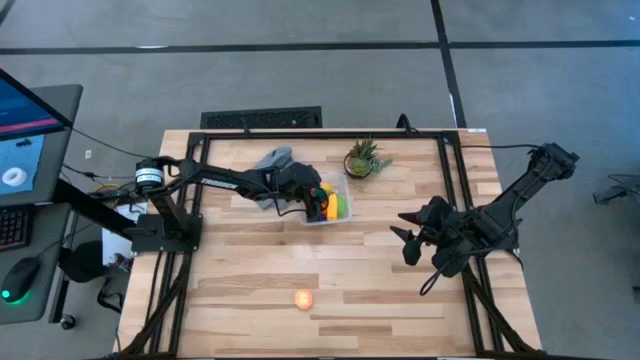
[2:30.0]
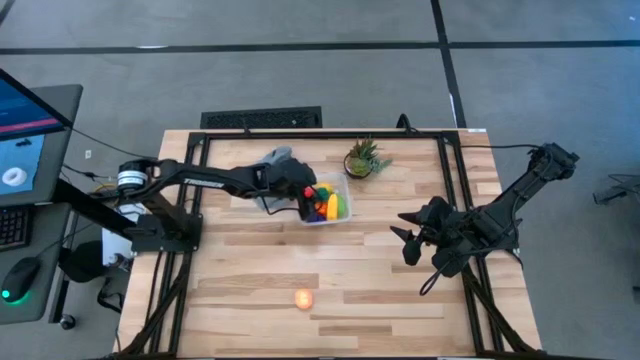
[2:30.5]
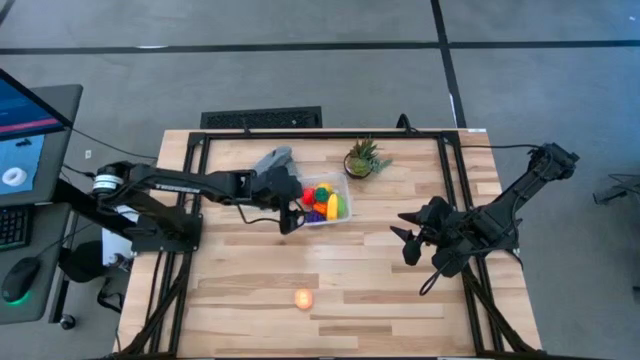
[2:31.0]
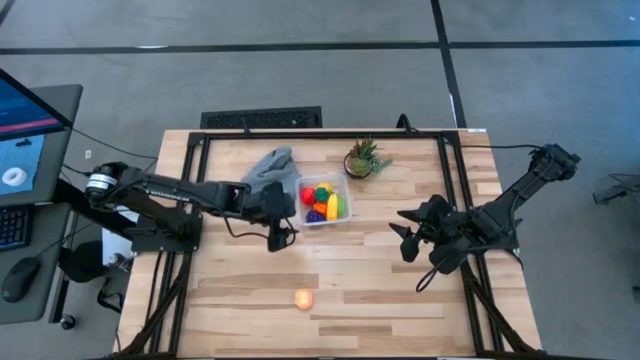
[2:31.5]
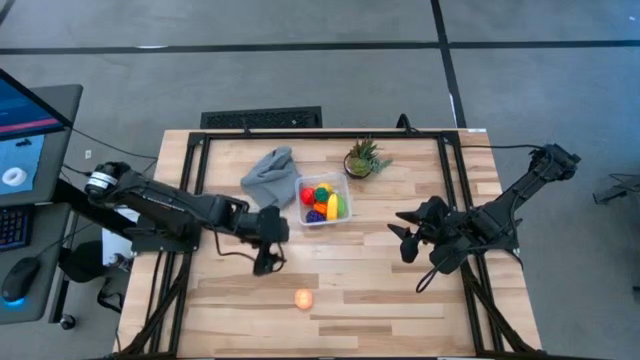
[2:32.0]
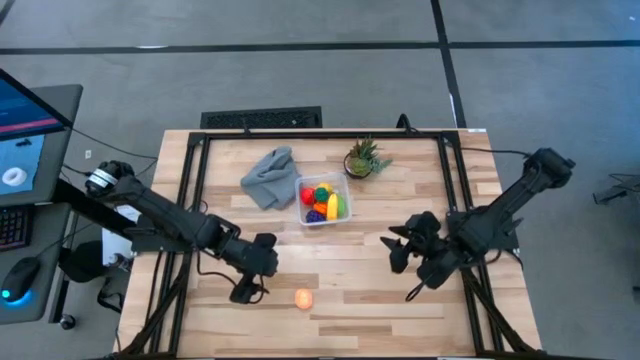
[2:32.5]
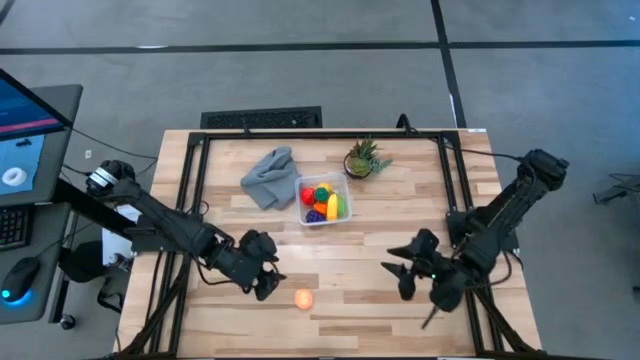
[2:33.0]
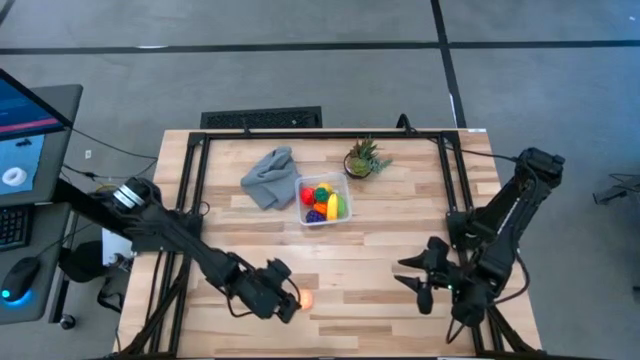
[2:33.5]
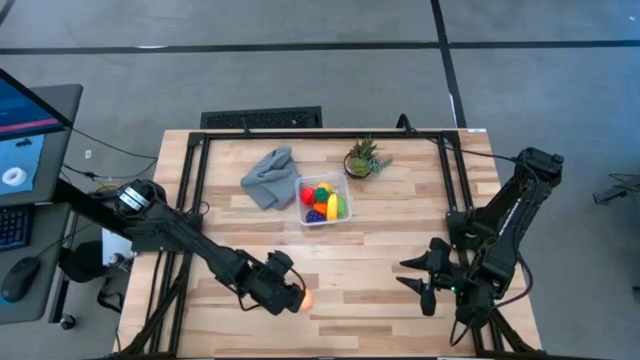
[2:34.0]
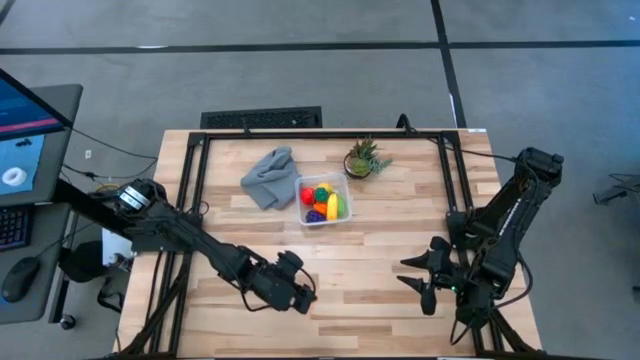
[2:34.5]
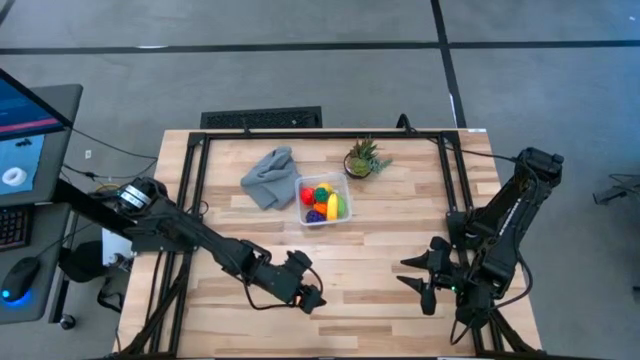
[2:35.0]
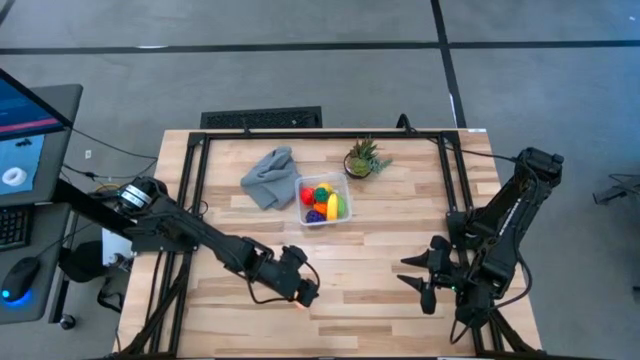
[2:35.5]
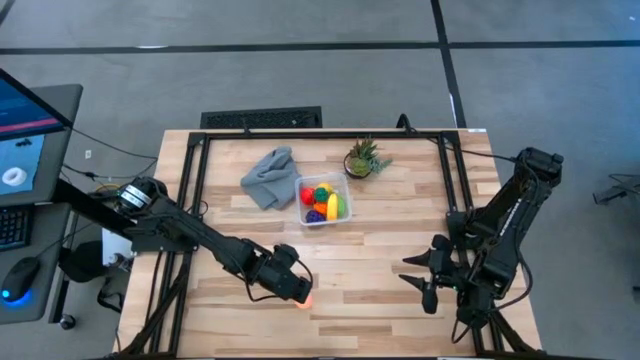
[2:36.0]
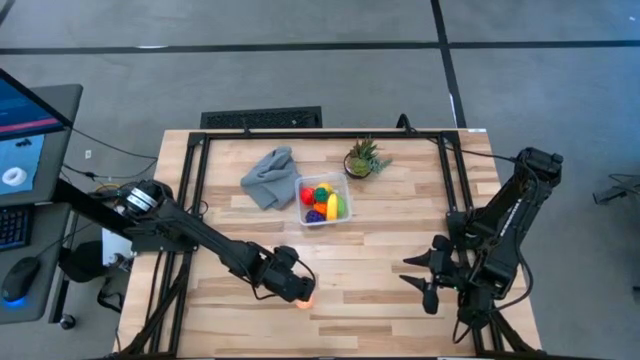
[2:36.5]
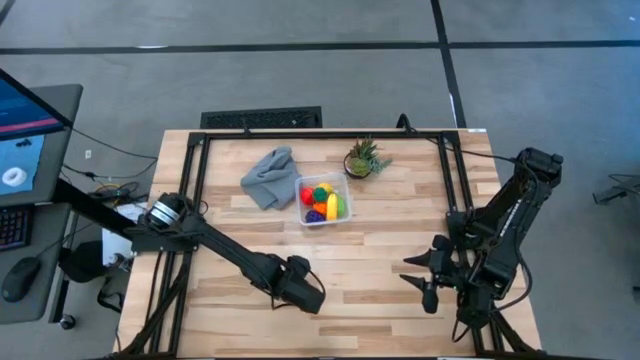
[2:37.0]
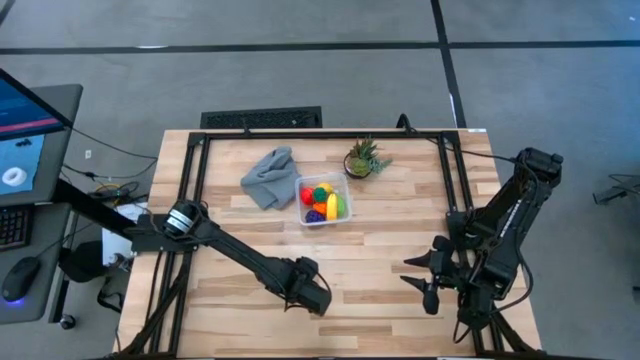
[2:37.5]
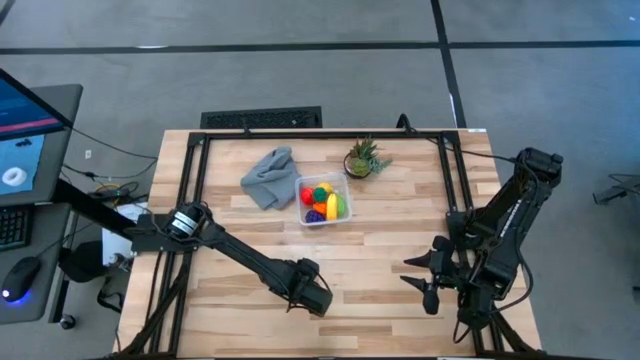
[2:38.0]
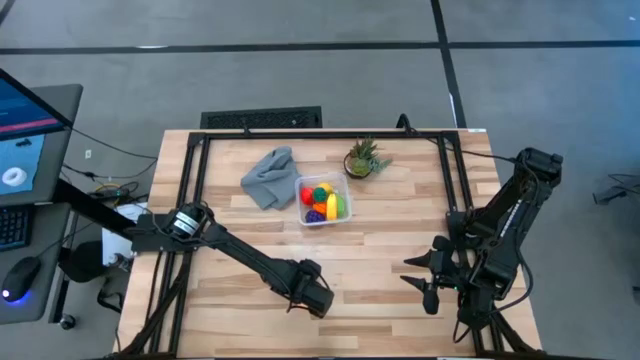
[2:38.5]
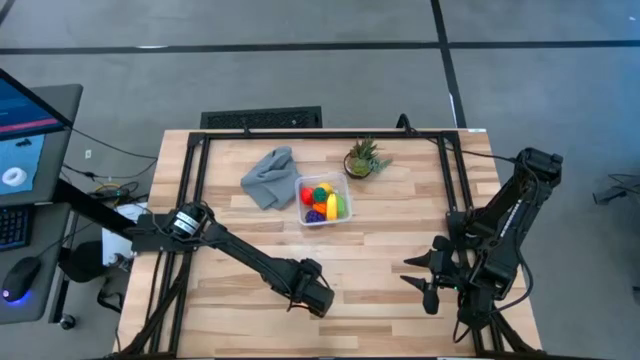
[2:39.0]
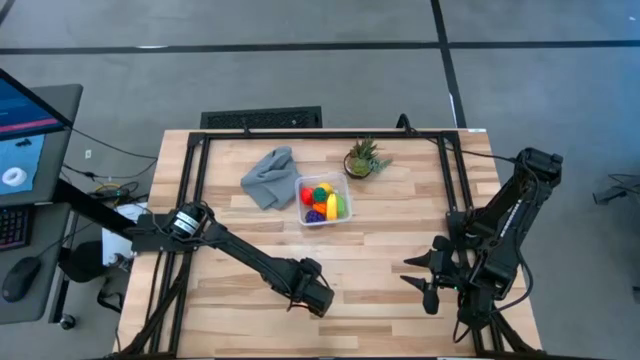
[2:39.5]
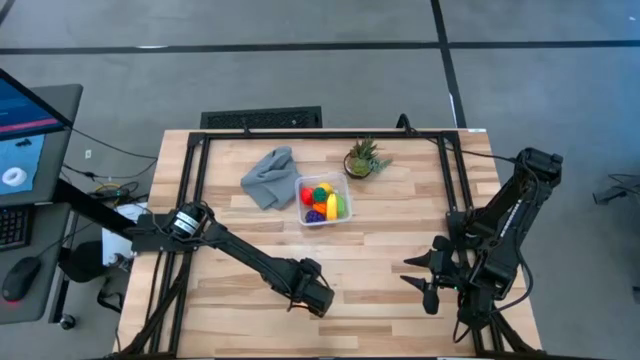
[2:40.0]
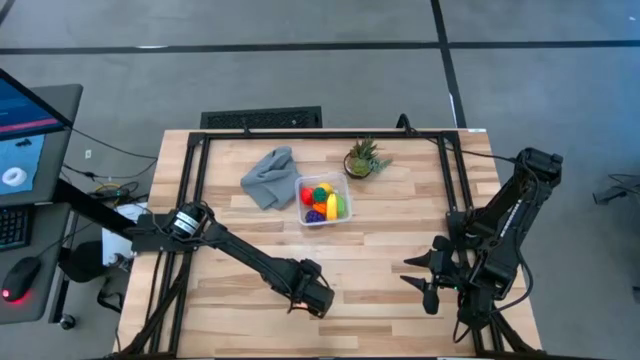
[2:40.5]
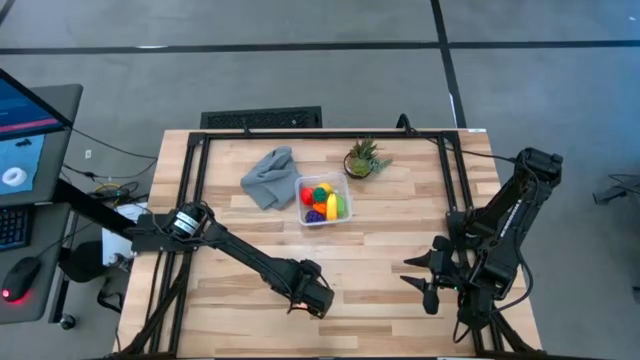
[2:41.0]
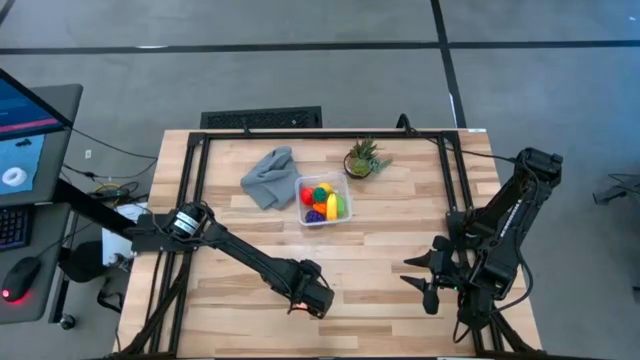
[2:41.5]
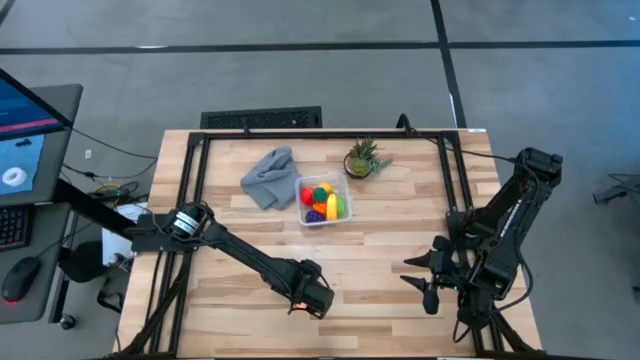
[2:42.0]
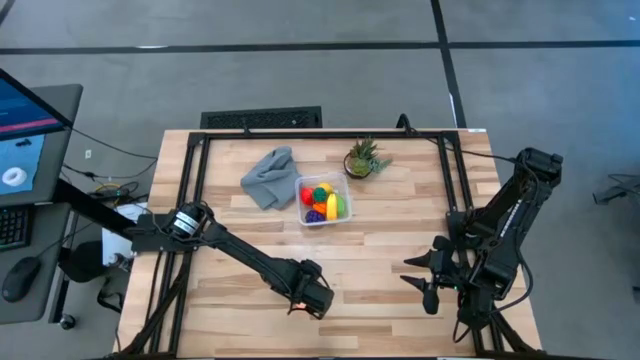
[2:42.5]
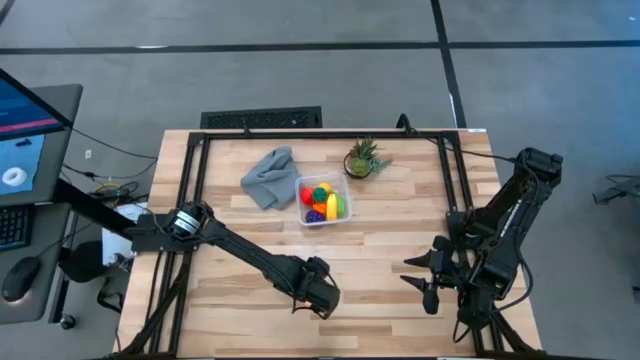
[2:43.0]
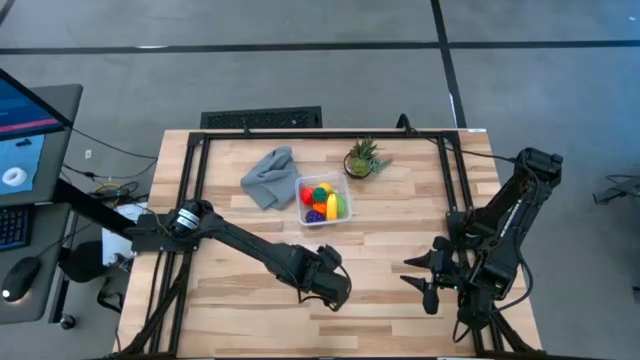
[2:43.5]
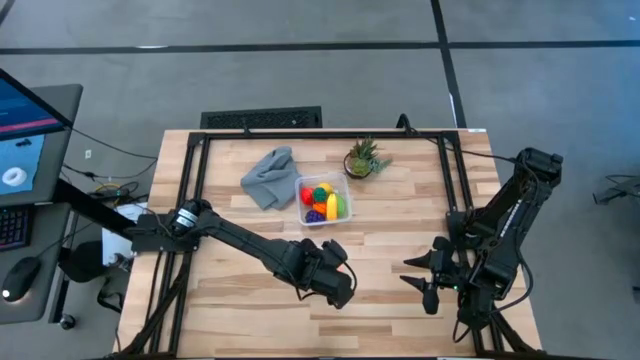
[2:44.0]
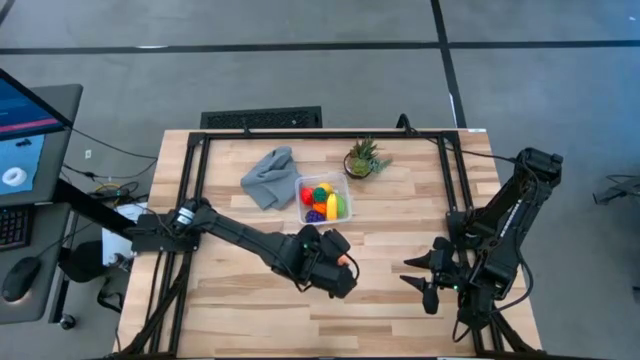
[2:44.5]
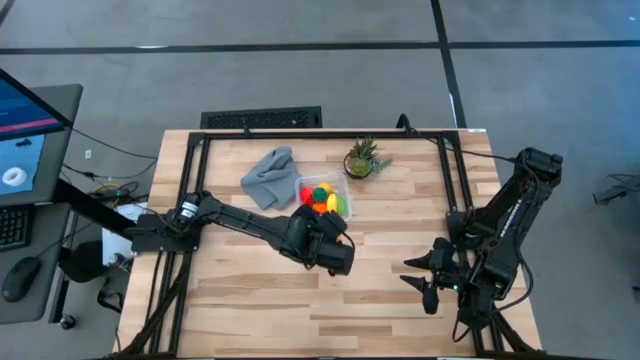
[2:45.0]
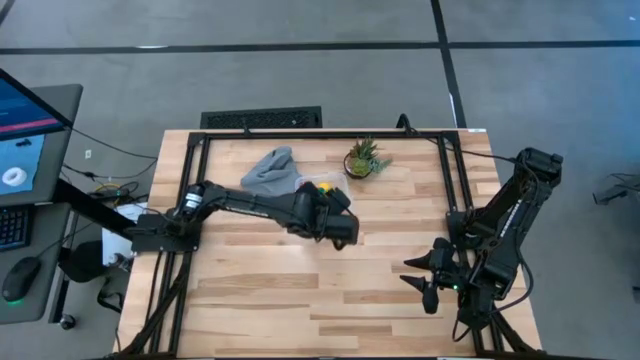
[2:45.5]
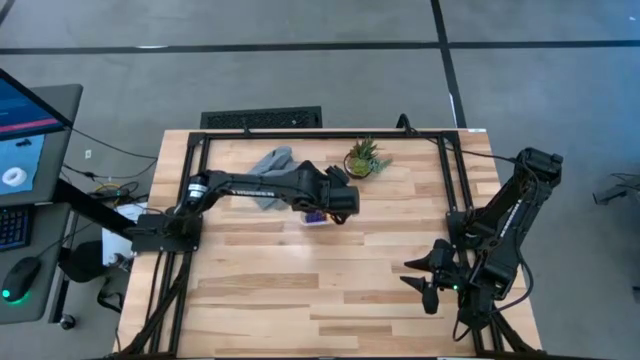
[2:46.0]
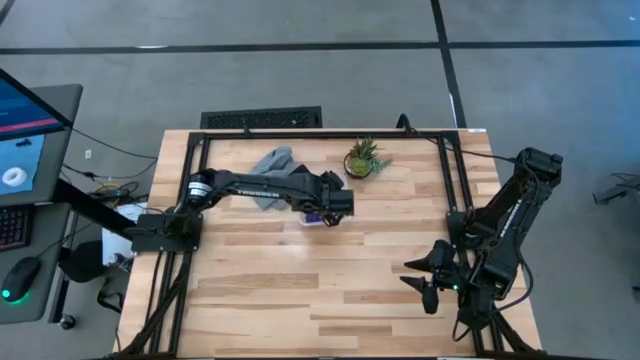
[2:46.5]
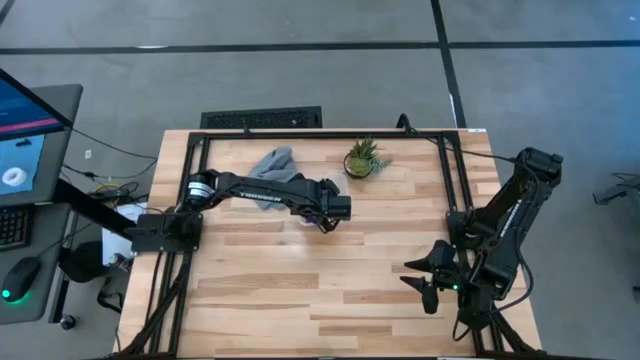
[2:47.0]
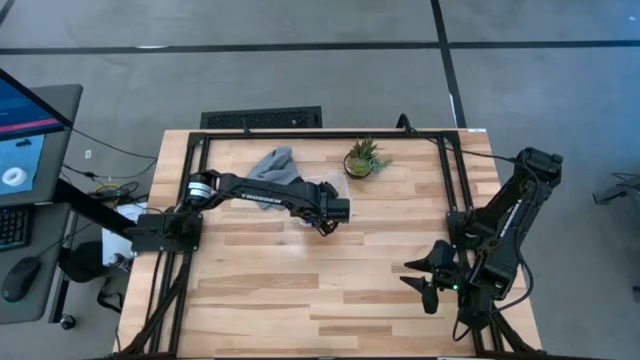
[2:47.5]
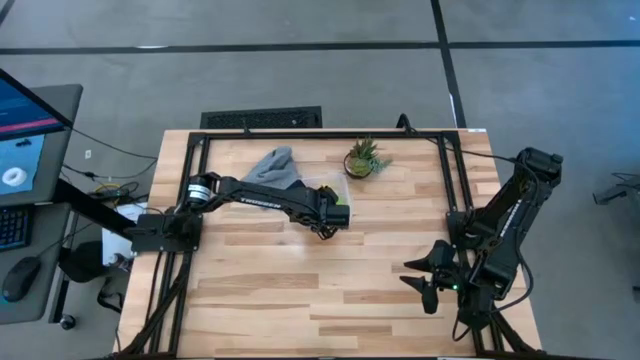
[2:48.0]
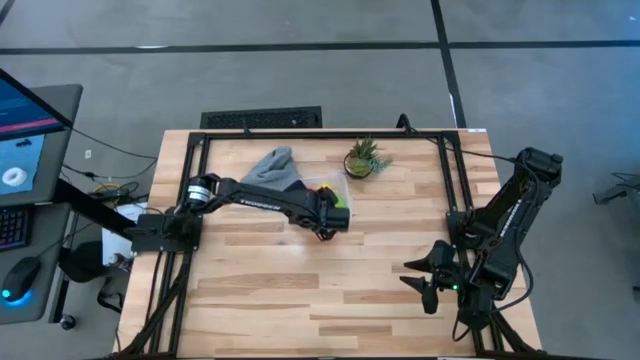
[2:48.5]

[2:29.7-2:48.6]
Task: Pick and placing Produce into tupperware
Put the orange peach into the transparent bin

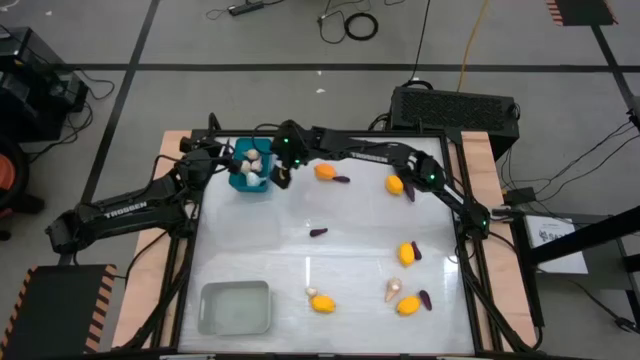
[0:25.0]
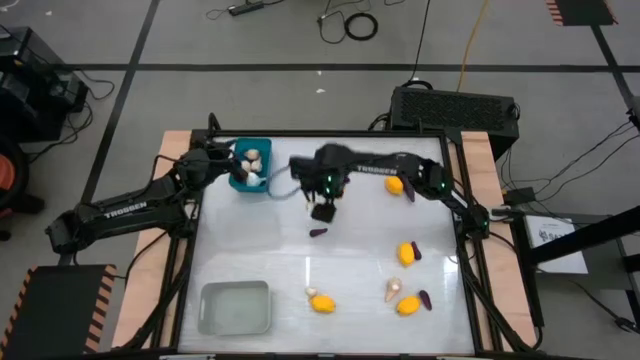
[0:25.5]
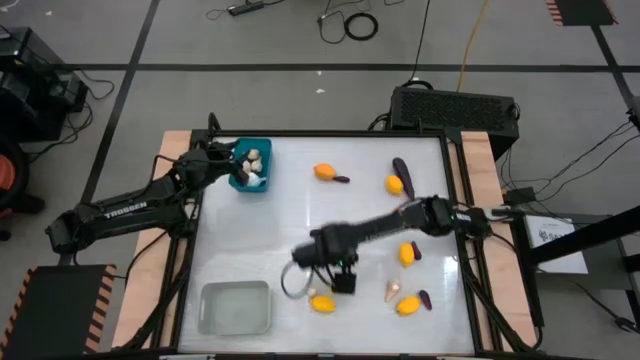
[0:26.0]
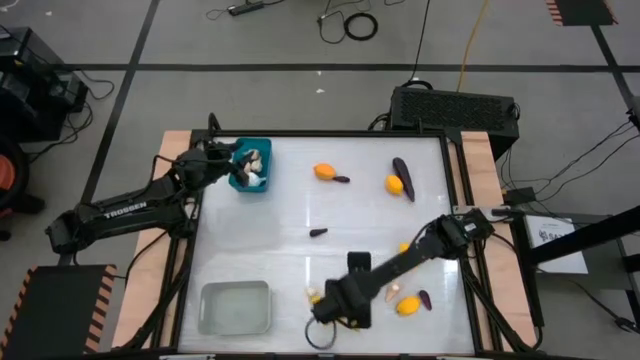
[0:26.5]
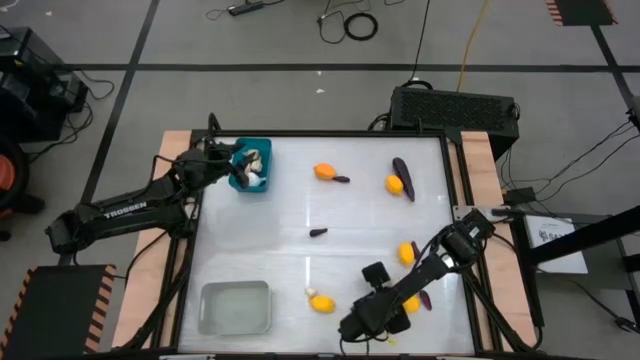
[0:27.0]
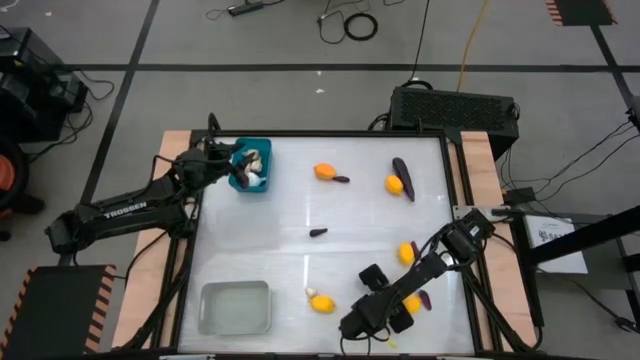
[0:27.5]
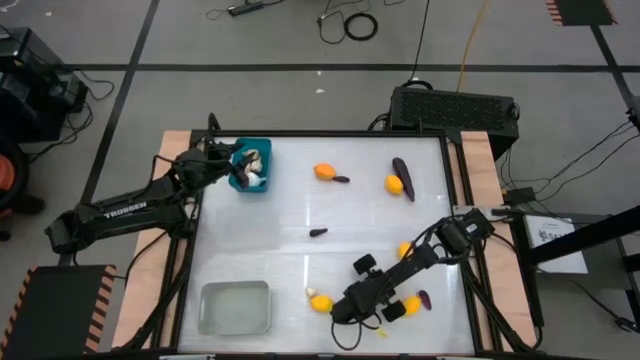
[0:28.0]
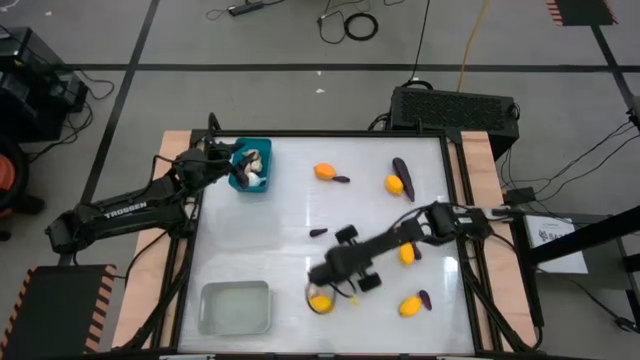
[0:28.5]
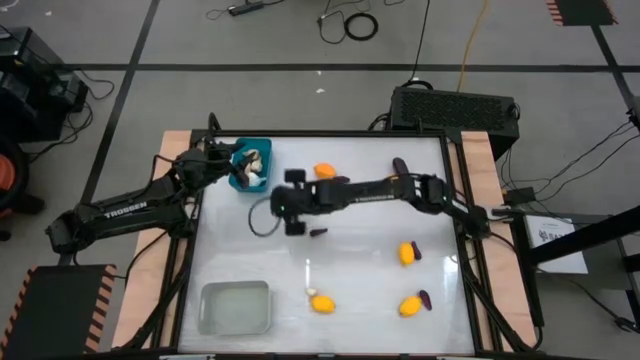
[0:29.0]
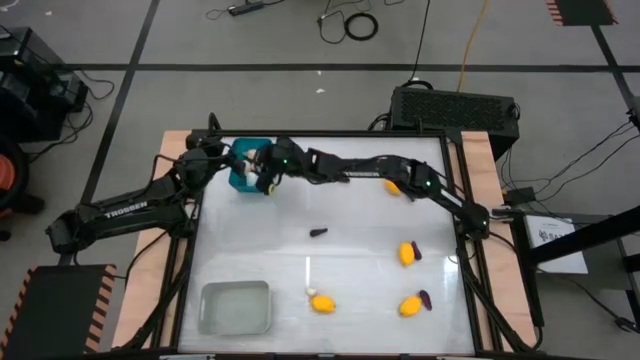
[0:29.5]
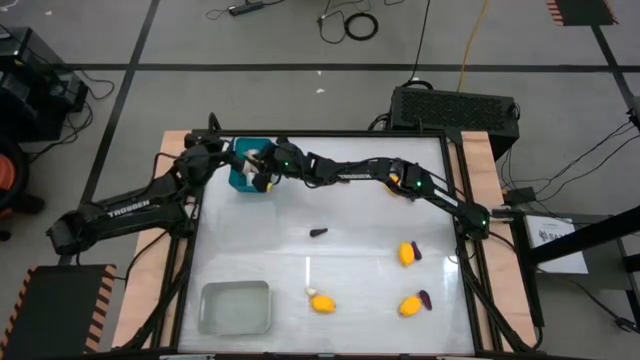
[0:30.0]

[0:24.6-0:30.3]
Task: Sort produce into baskets
Put the garlic into the blue bin
